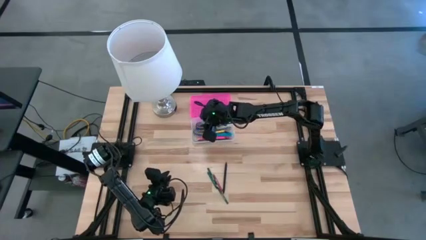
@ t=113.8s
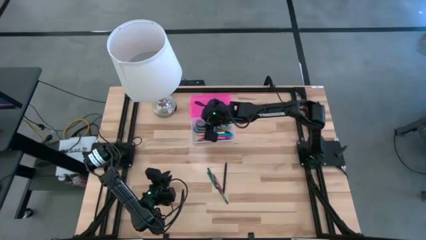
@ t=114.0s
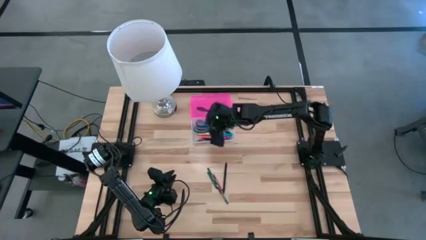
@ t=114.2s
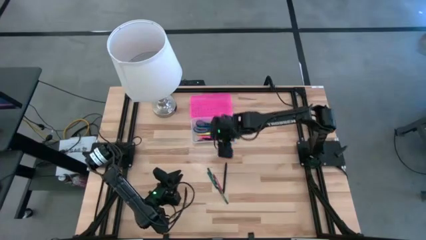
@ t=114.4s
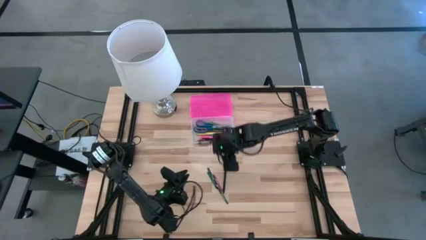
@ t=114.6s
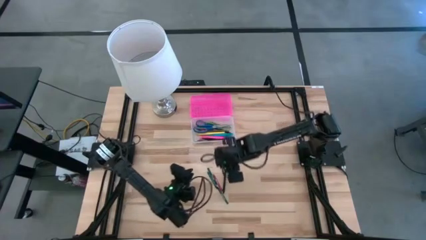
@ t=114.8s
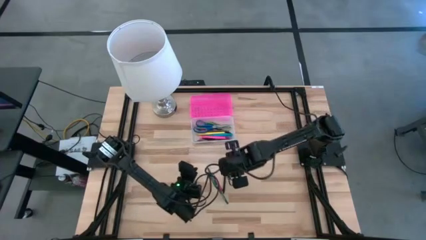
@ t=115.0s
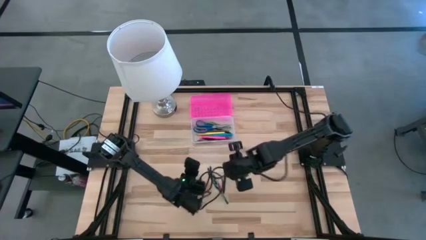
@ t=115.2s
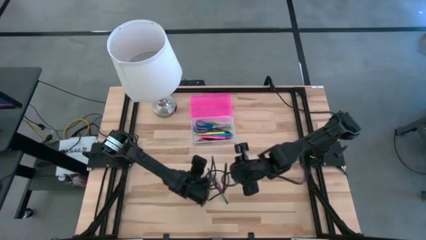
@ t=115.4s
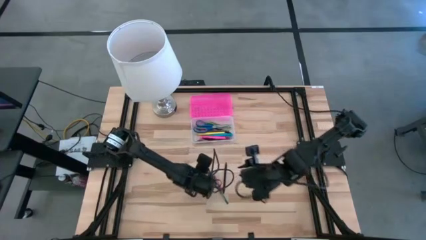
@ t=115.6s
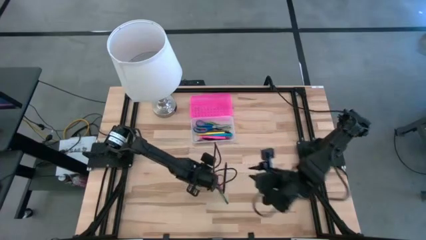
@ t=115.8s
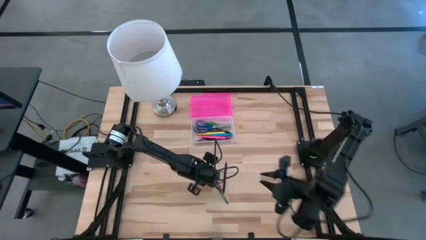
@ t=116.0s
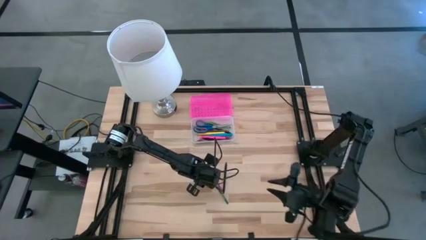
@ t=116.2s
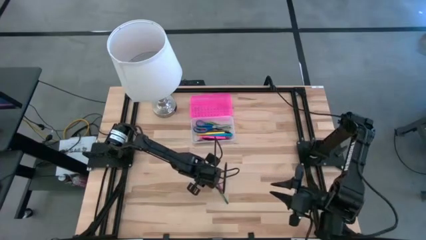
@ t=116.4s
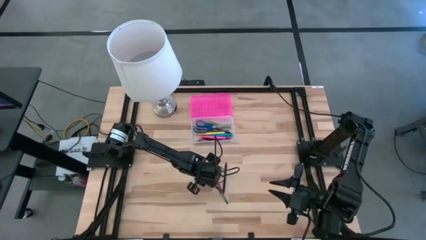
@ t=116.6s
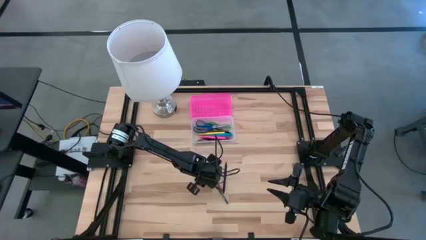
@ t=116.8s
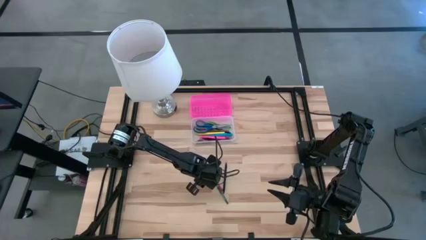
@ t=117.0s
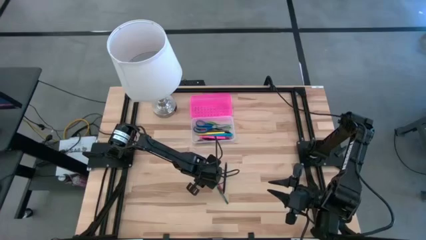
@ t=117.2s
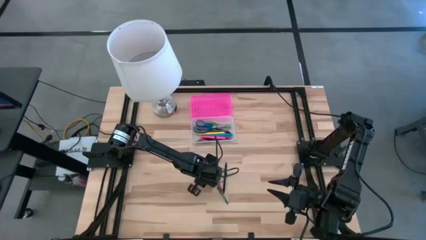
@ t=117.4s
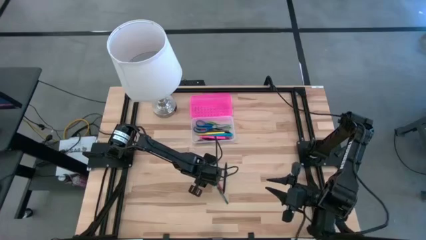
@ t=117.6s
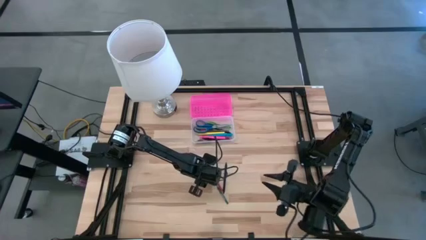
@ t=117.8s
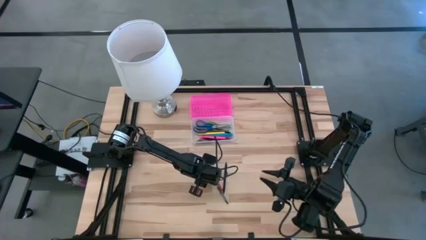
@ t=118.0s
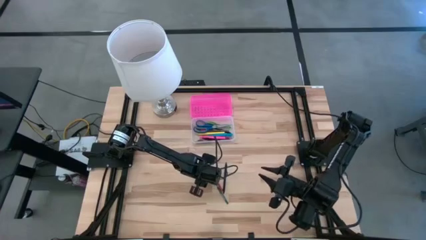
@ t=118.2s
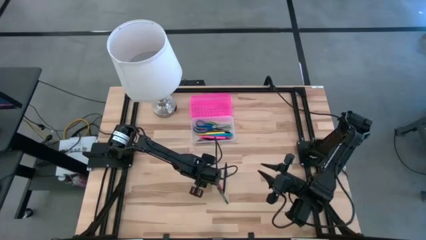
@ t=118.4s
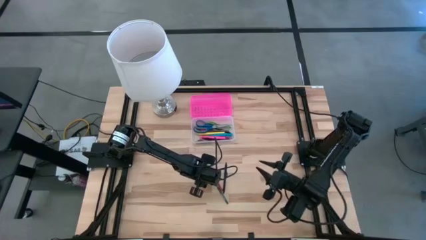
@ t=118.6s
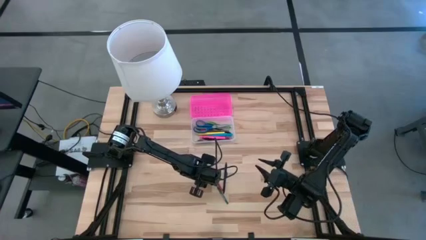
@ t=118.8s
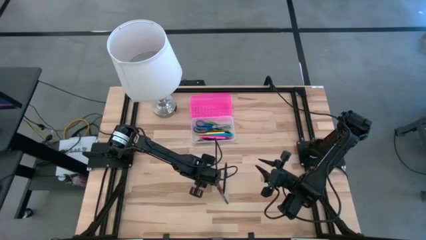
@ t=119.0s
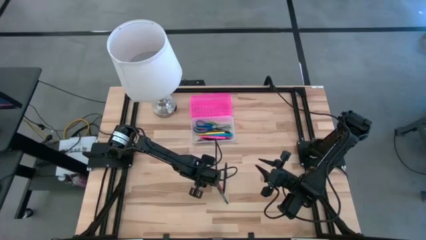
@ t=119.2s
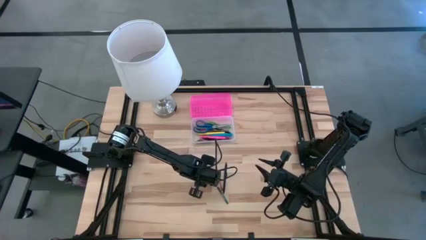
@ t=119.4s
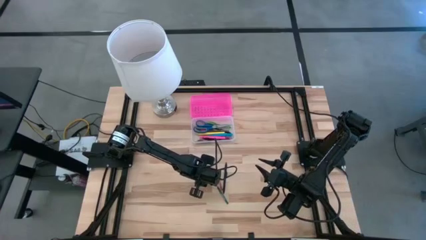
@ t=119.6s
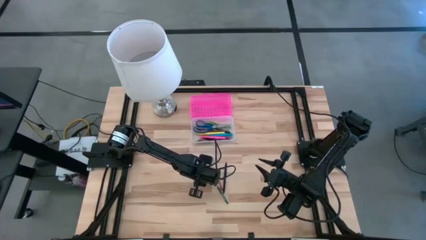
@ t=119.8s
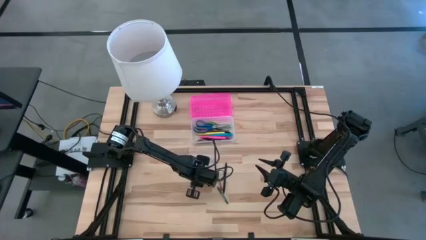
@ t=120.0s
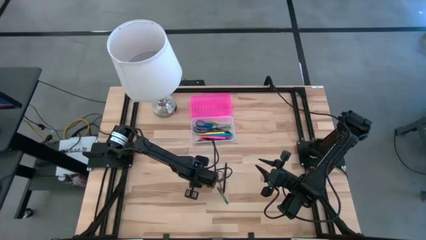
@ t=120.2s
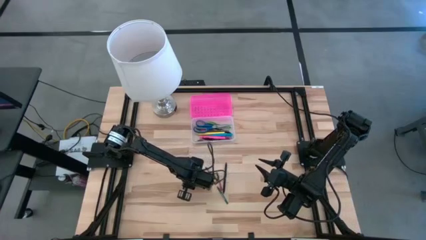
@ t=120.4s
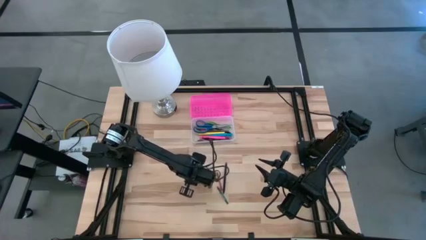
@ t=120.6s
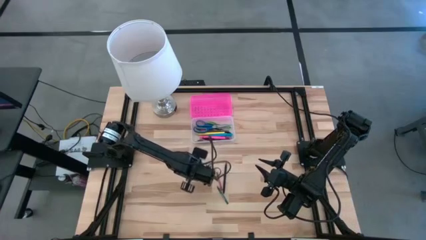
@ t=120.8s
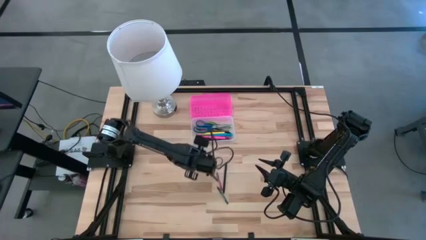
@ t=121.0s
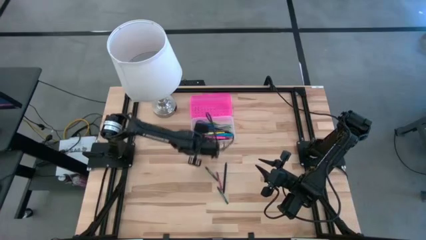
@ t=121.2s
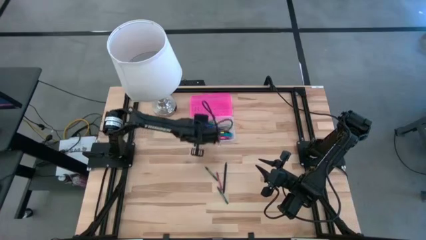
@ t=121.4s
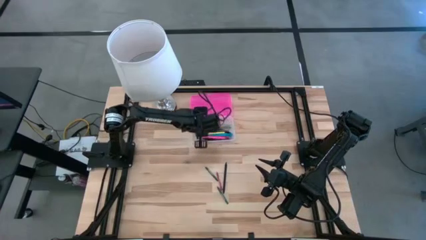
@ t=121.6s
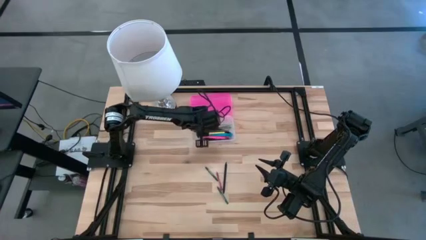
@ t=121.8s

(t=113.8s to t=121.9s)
Task: Pick & place school supplies into a supply box
Put the green crayon into the pink supply box

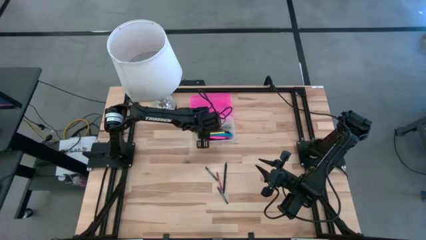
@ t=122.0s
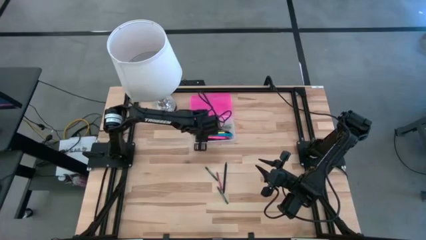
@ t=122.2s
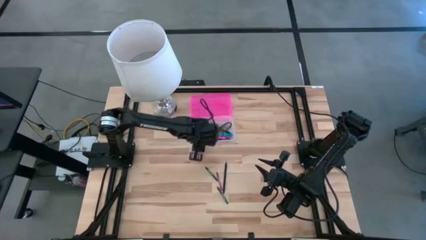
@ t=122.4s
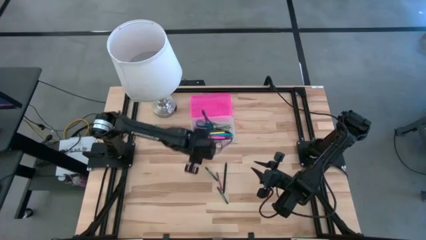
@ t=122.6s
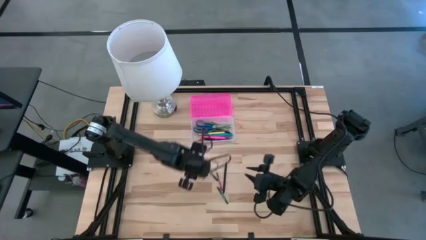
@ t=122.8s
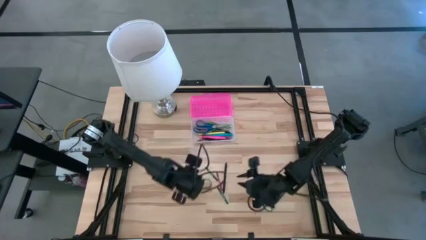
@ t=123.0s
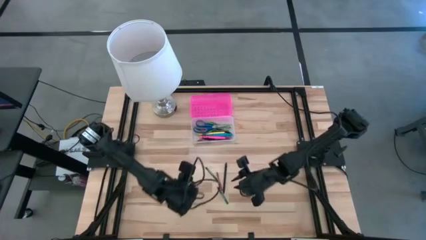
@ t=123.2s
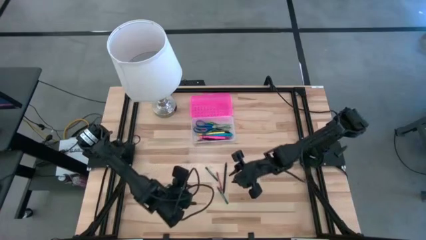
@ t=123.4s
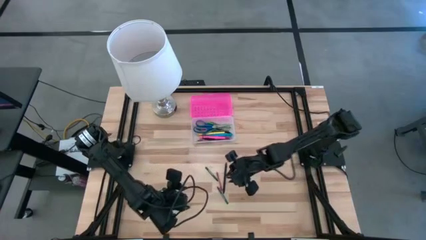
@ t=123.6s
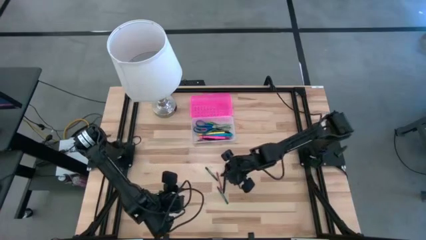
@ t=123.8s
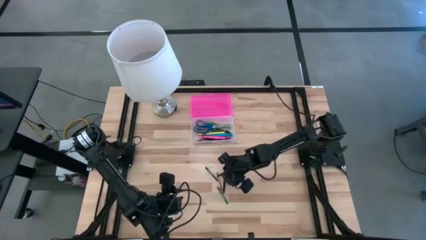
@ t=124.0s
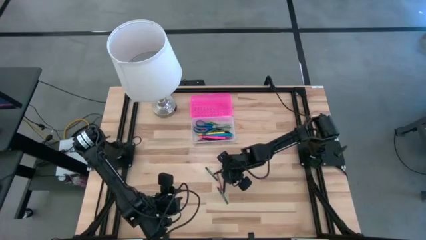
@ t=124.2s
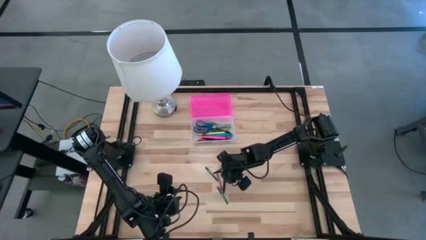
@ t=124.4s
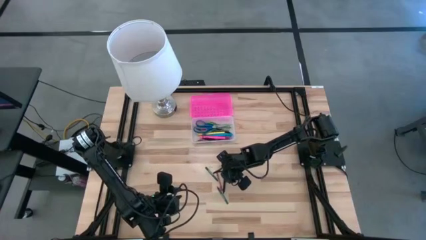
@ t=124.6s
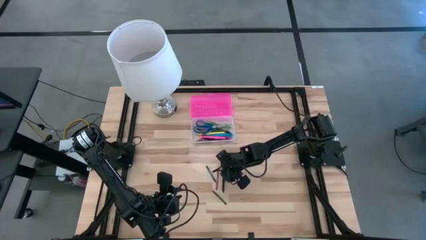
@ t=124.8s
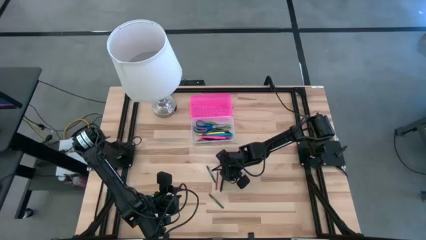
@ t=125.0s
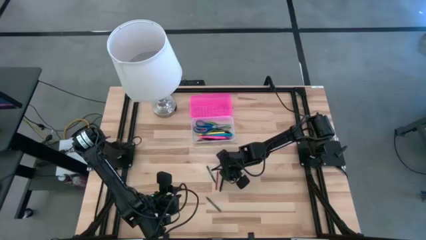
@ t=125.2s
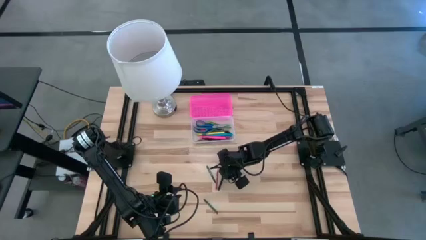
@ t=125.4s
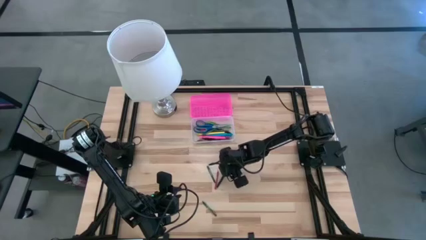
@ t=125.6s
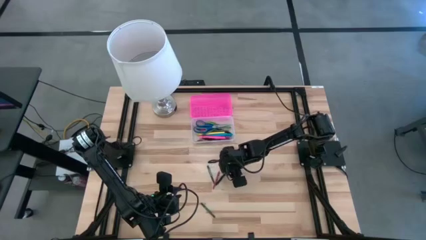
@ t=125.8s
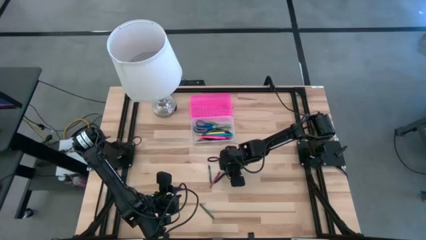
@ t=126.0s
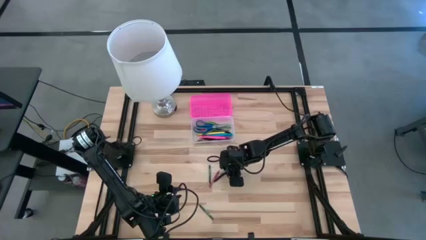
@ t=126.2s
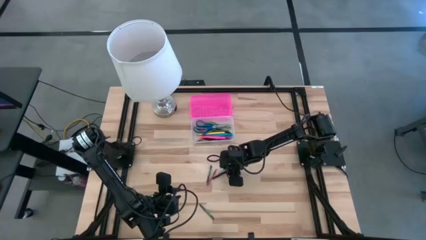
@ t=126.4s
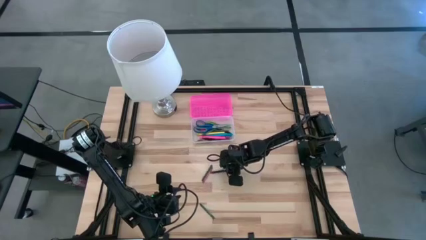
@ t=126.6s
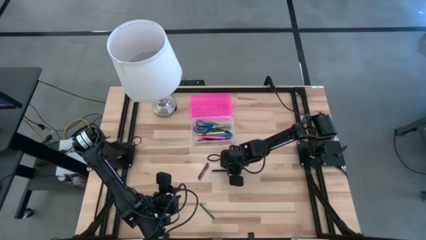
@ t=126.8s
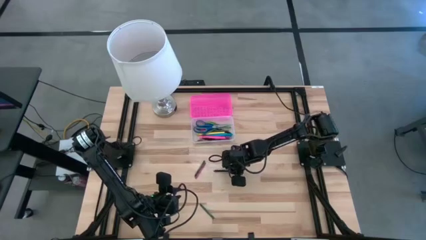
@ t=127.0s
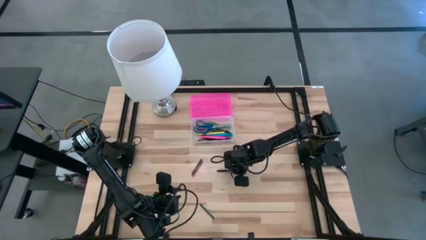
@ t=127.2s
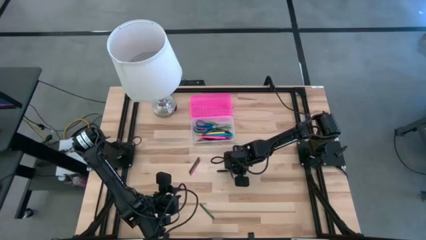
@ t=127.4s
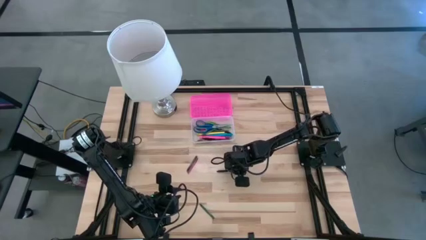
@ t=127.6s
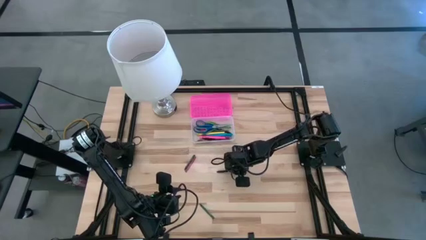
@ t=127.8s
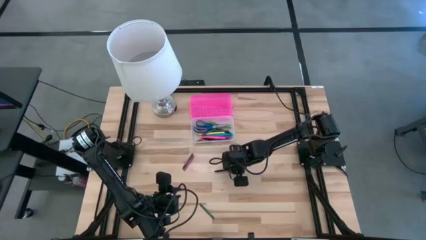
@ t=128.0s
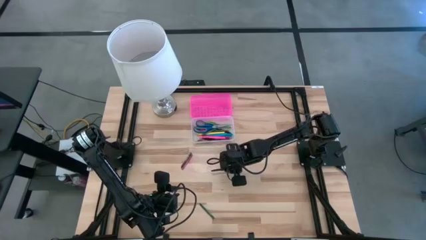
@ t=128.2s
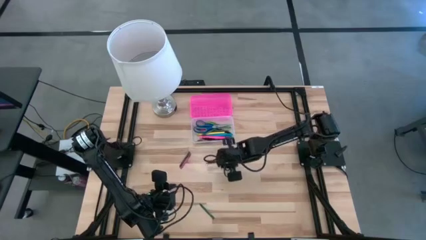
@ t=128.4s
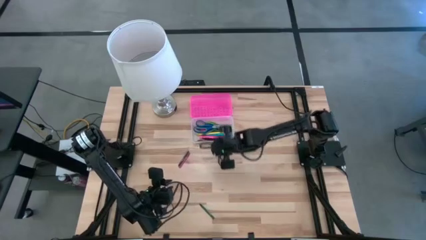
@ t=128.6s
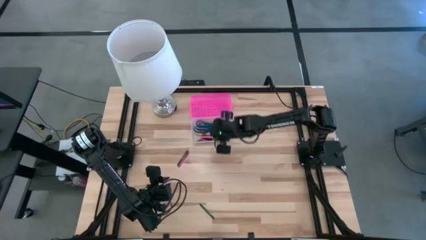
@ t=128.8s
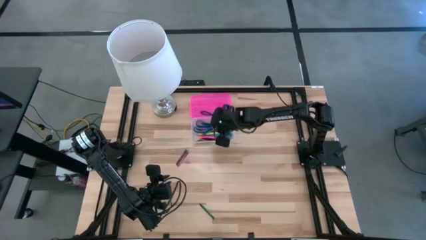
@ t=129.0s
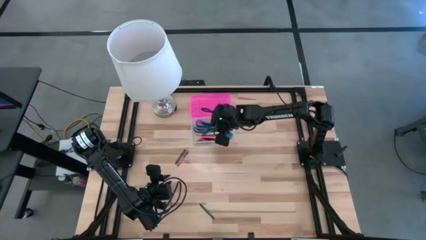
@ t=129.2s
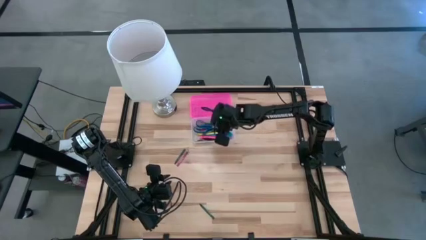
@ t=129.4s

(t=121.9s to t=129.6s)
Put the black pen into the pink supply box

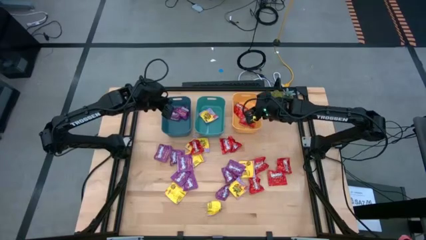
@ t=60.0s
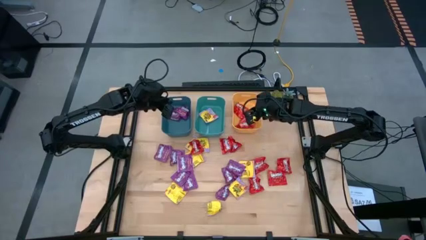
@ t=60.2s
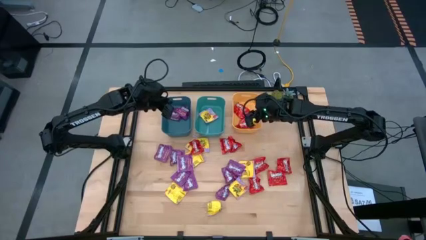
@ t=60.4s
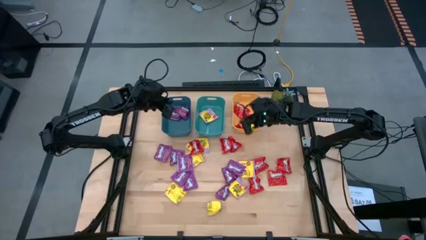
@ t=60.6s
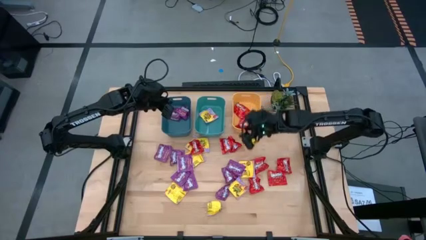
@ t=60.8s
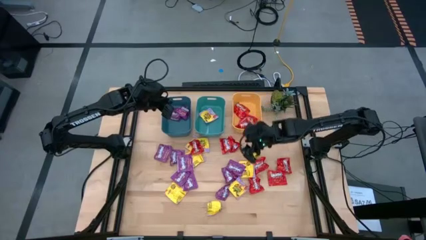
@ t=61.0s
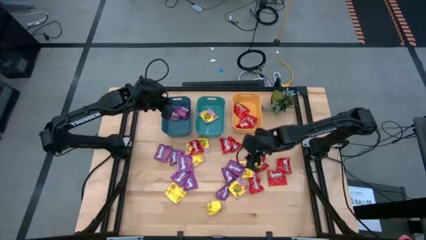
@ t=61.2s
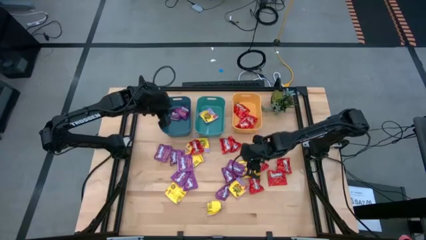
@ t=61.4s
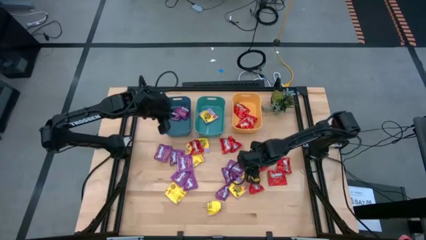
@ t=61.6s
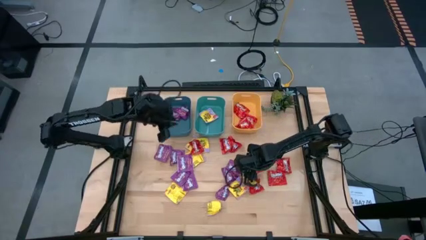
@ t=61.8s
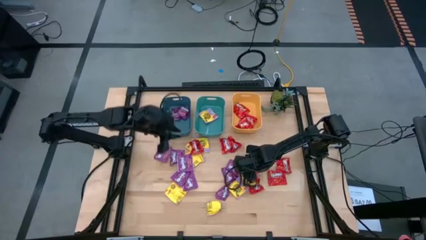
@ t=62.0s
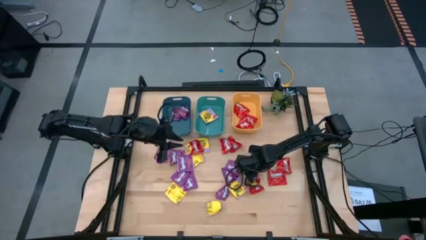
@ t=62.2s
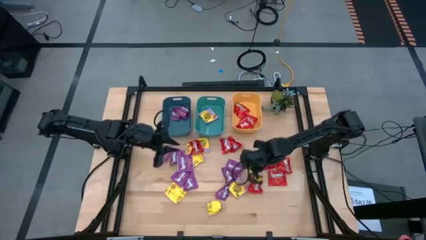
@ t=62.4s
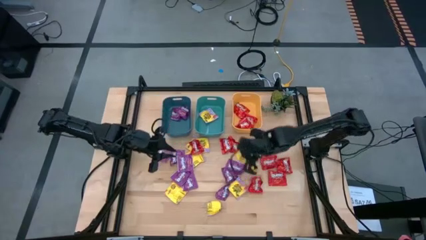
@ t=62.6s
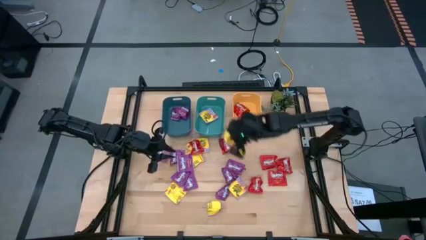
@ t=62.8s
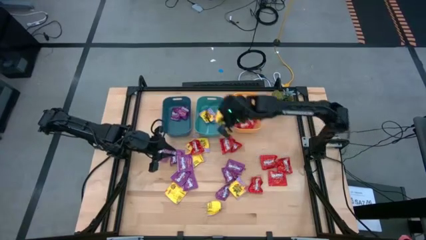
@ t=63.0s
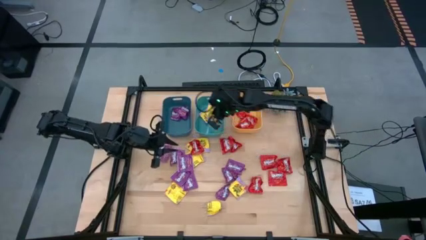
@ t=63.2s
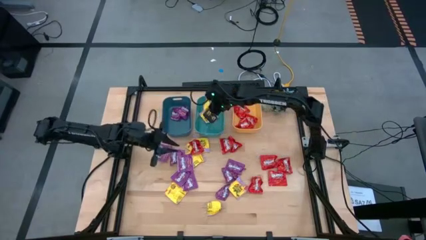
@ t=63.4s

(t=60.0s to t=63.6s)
Task: Sort candy
Put the yellow candy into the green bin
